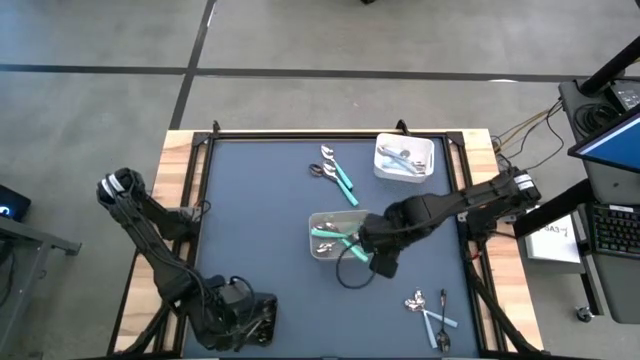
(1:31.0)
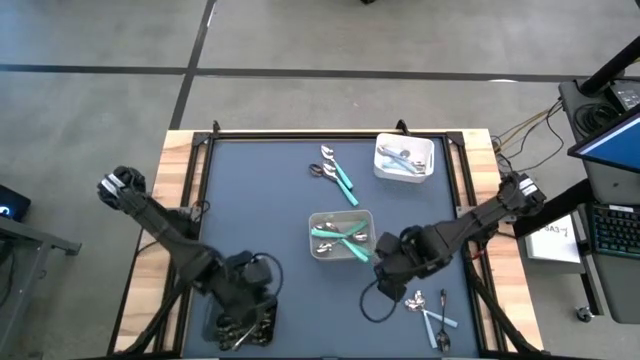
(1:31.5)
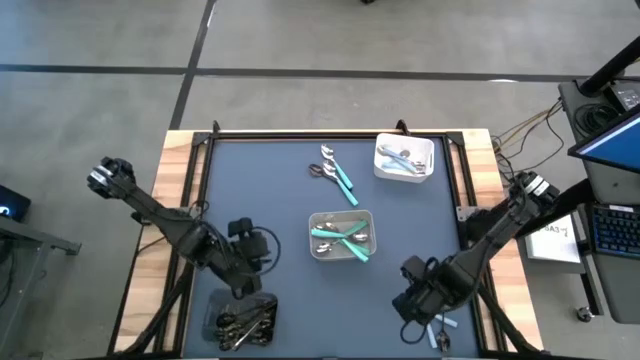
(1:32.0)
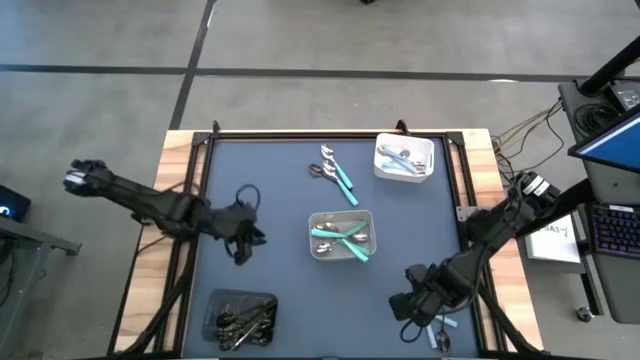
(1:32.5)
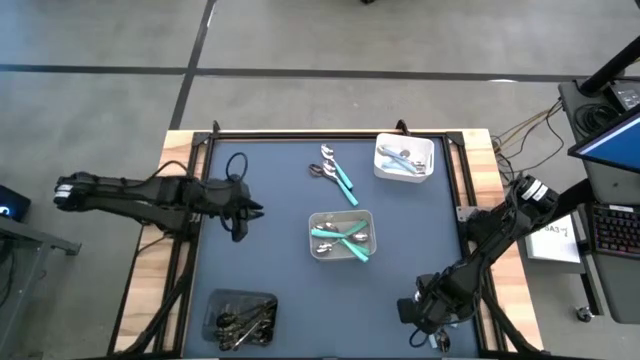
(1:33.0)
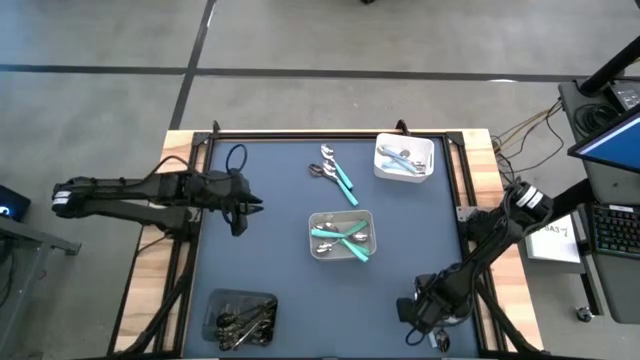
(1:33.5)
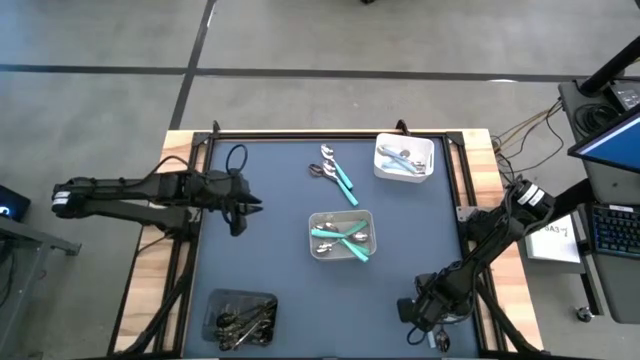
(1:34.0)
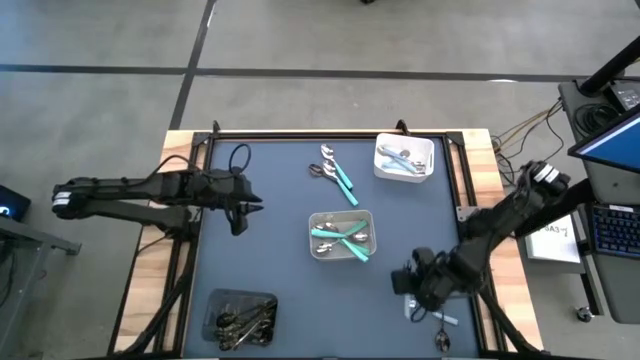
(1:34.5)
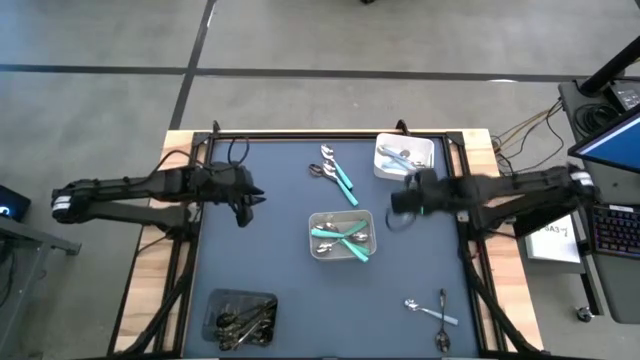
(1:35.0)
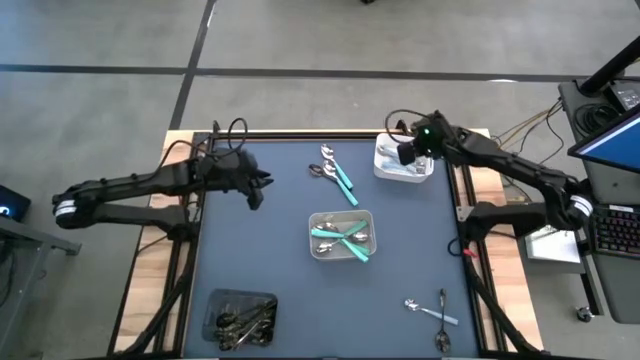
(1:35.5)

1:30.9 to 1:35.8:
Task: Sort silverware by color (type)
Put the blue spoon into the white bin

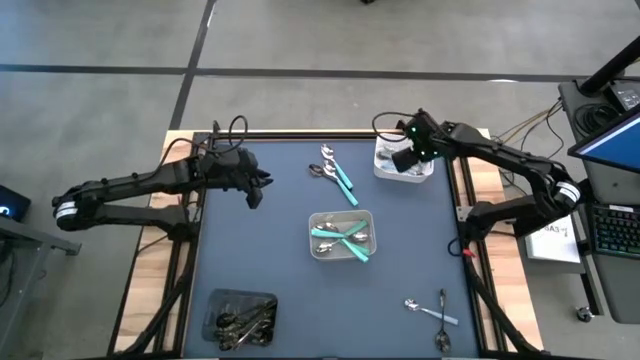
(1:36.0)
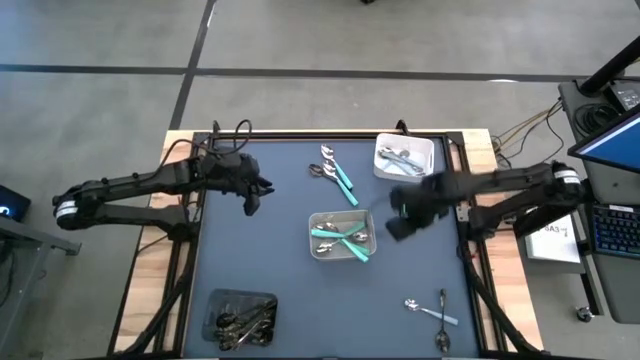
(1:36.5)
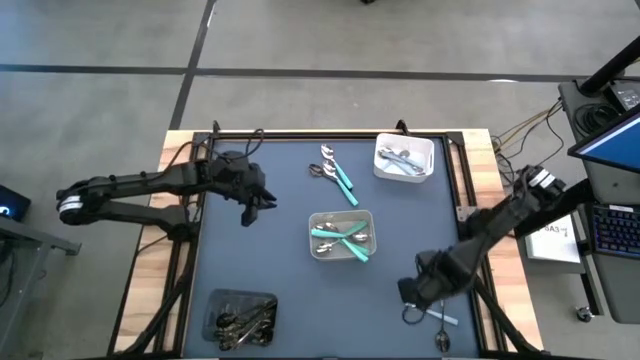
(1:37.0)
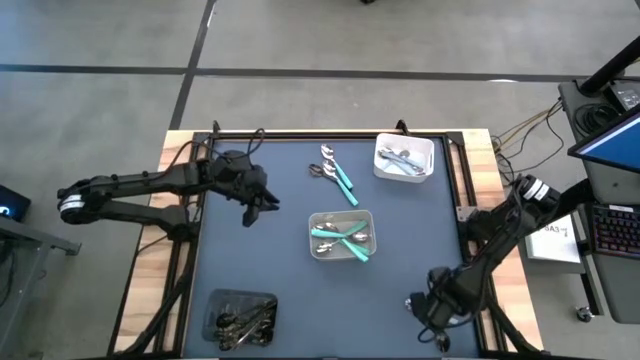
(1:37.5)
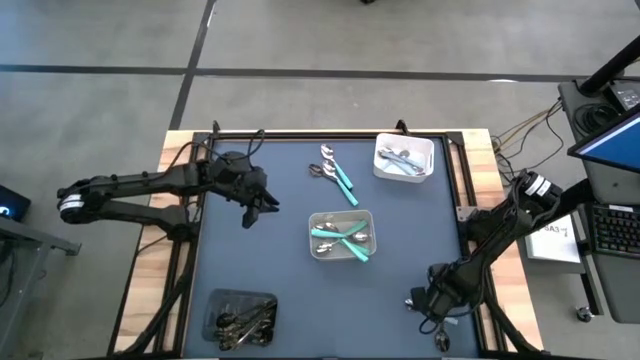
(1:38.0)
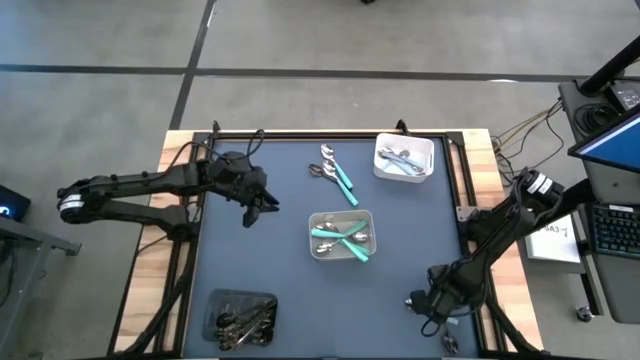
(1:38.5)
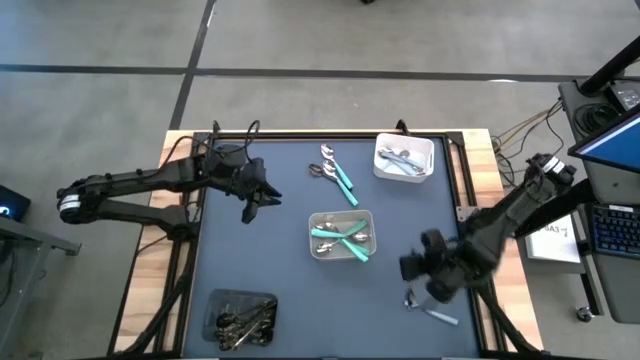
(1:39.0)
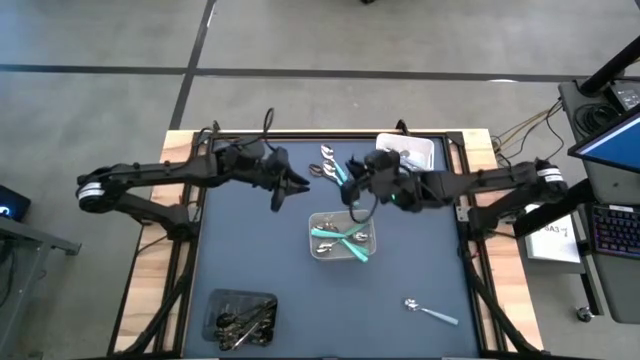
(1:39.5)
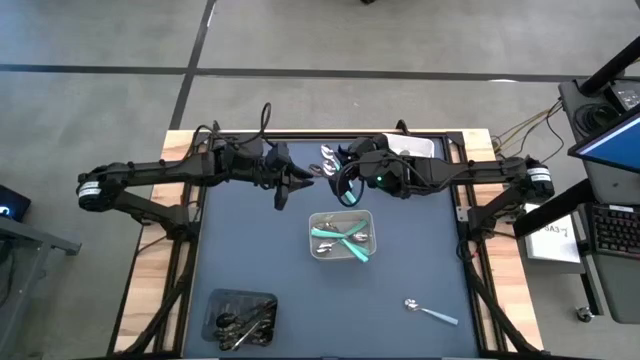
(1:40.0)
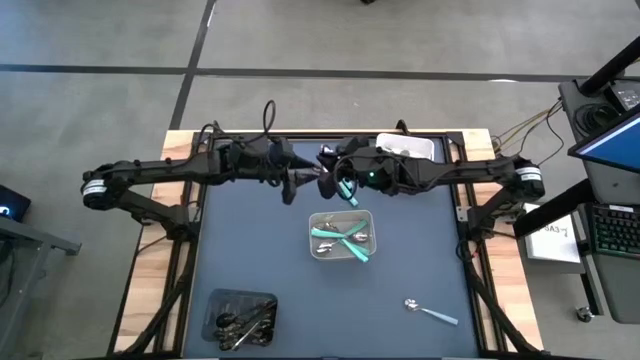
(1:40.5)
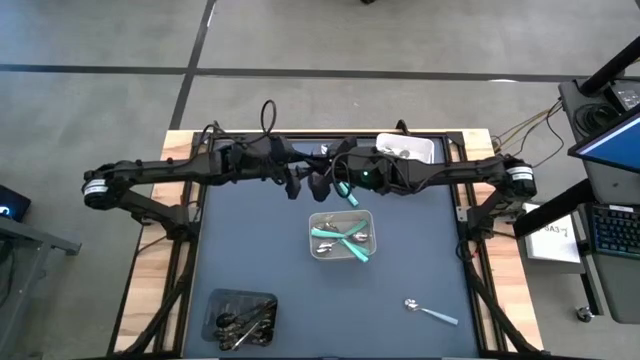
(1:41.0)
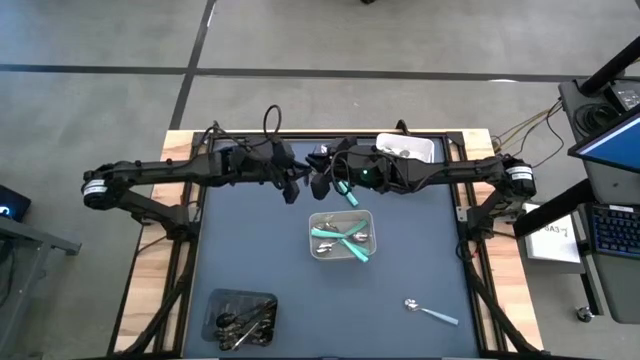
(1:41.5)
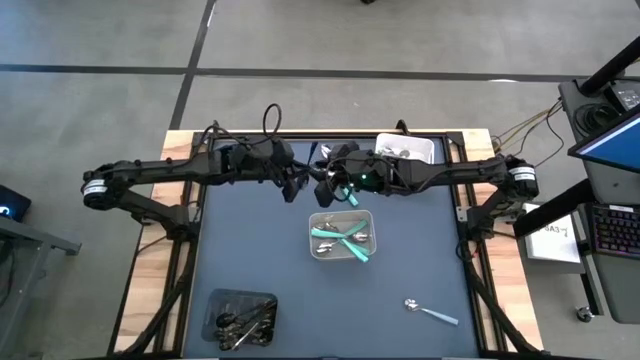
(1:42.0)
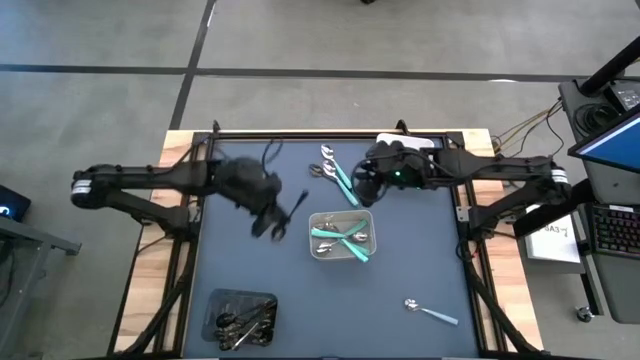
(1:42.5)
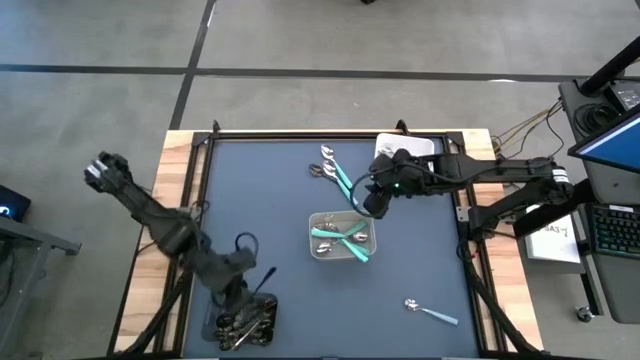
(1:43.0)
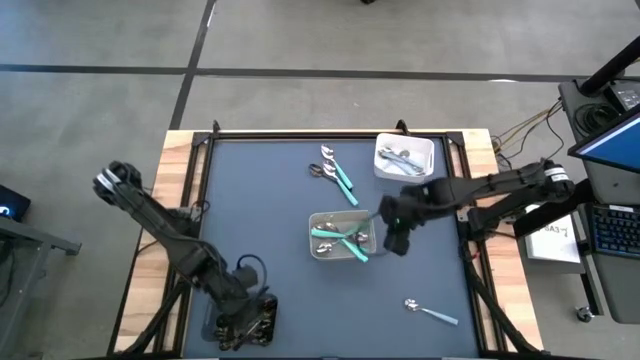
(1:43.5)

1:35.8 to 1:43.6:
Put the black spoon into the black bin

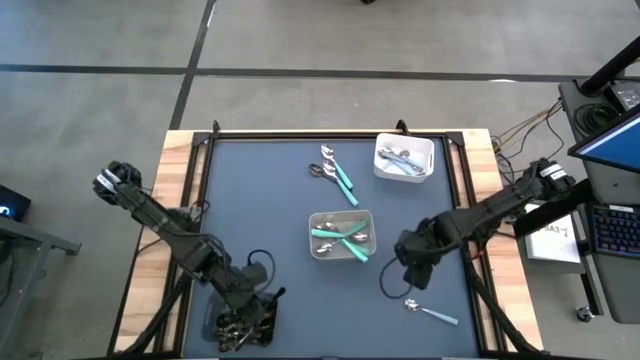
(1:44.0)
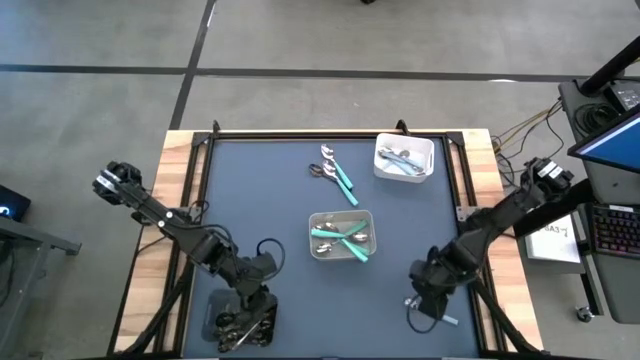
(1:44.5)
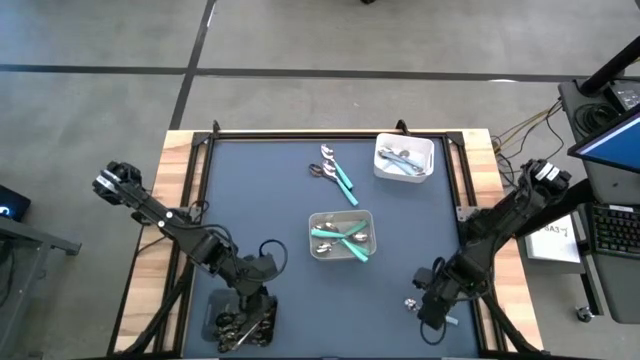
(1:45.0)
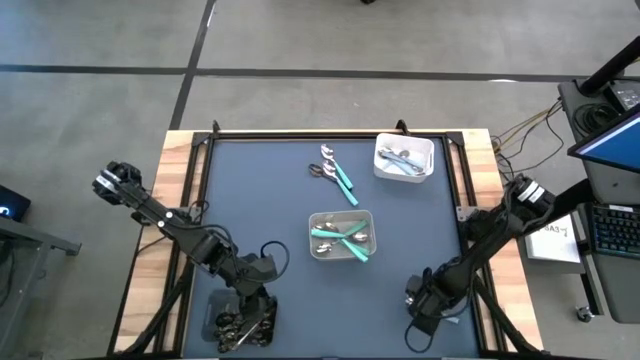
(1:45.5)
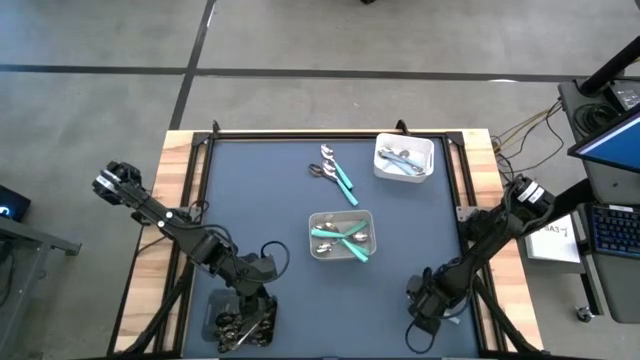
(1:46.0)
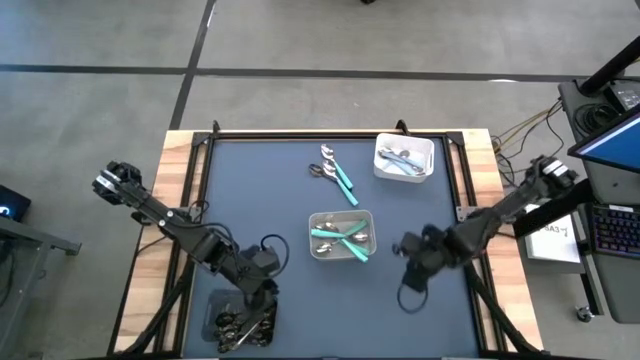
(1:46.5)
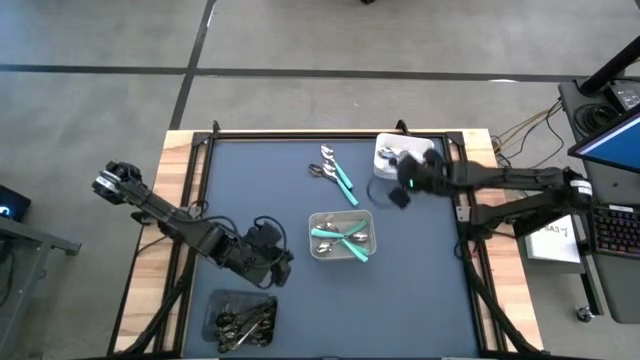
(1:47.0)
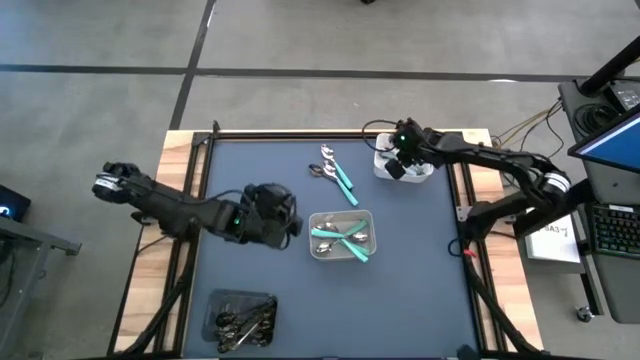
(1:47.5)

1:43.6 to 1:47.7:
Put the blue spoon into the white bin

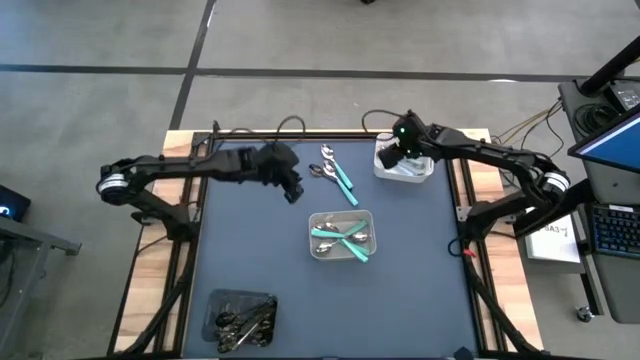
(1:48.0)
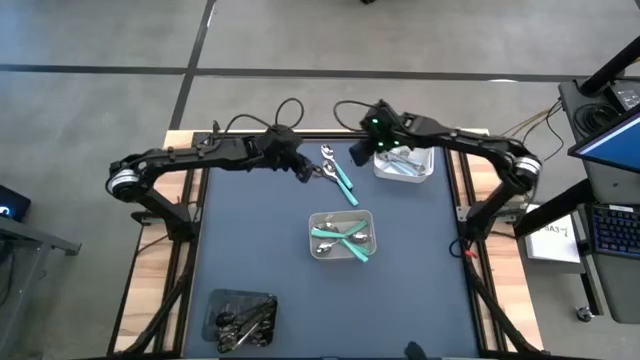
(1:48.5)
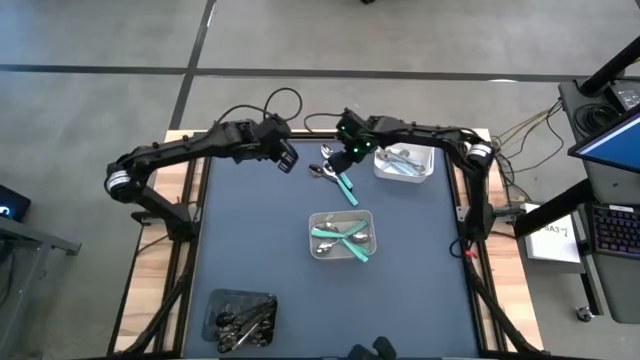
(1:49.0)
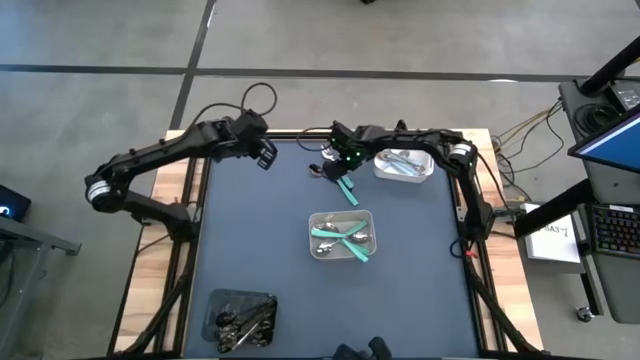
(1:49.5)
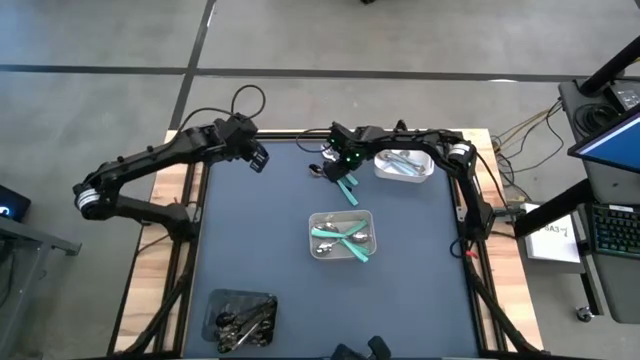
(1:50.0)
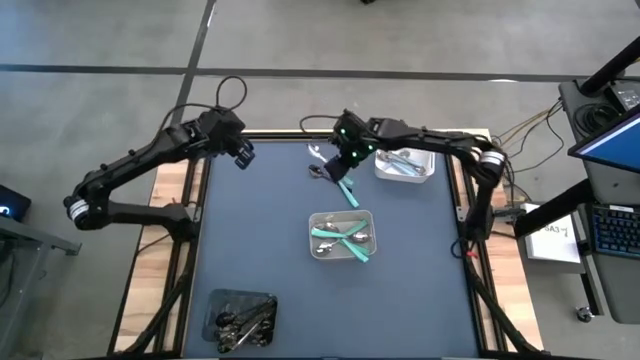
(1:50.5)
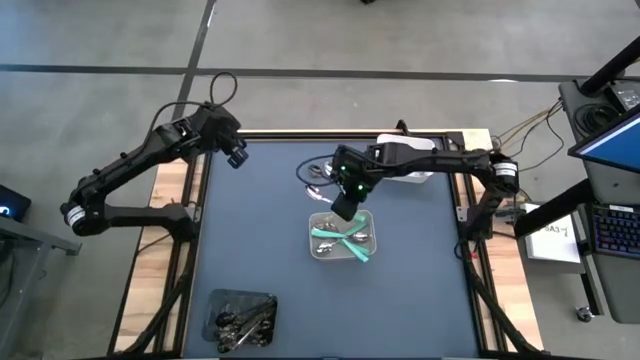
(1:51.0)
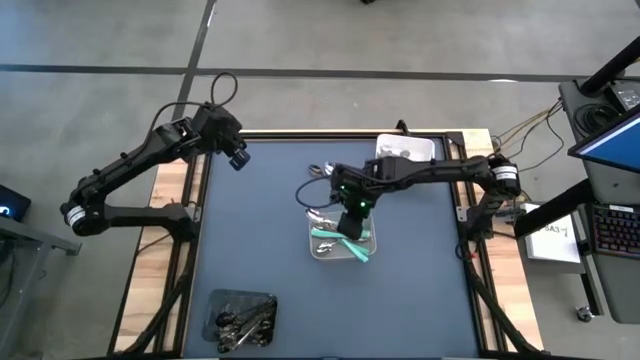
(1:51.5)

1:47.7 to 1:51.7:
Put the green spoon into the gray bin
